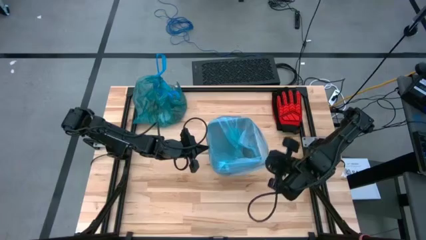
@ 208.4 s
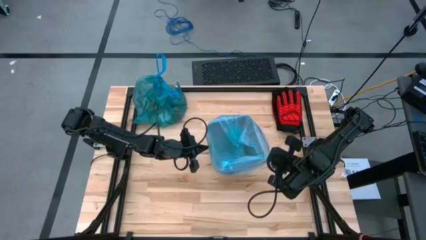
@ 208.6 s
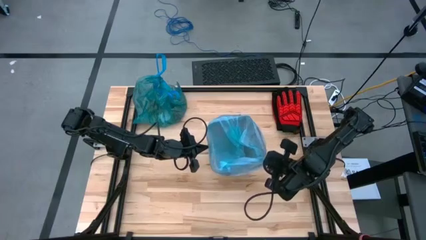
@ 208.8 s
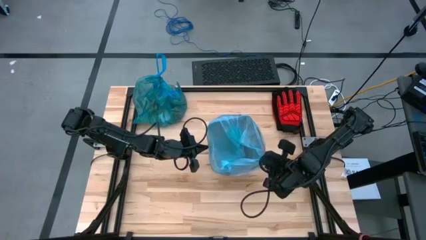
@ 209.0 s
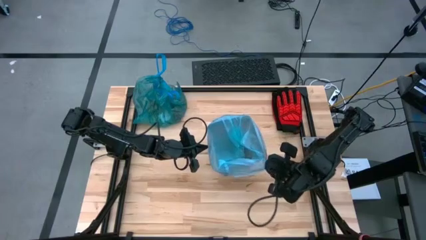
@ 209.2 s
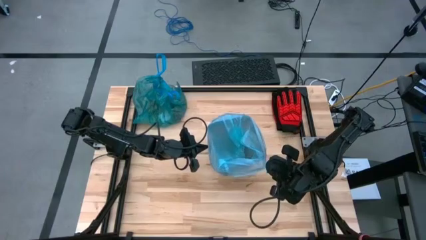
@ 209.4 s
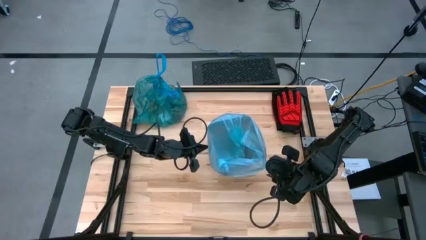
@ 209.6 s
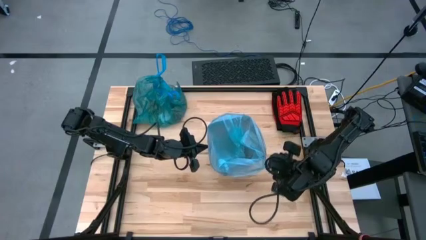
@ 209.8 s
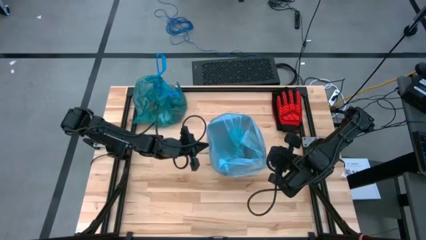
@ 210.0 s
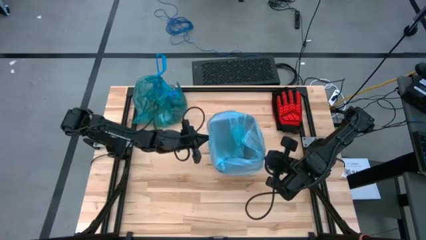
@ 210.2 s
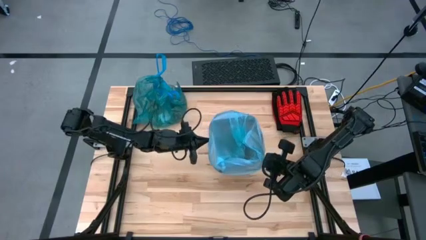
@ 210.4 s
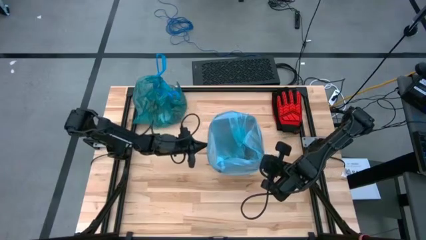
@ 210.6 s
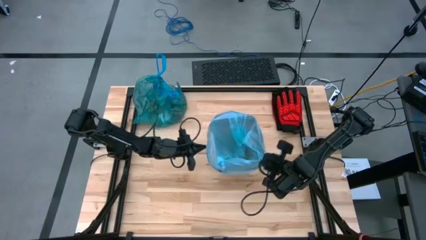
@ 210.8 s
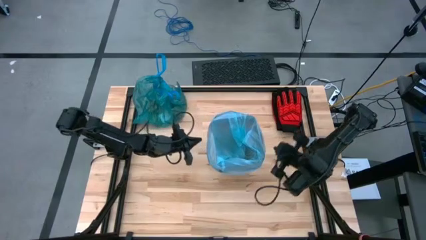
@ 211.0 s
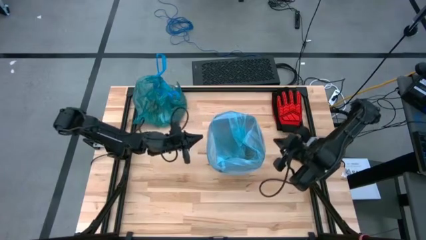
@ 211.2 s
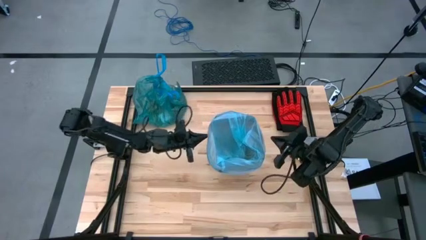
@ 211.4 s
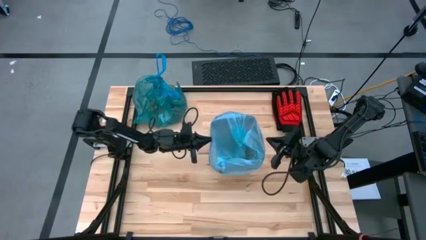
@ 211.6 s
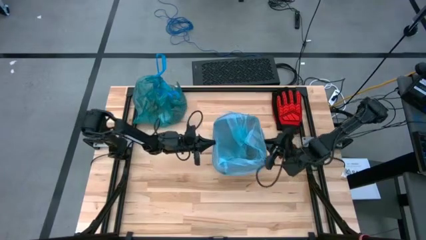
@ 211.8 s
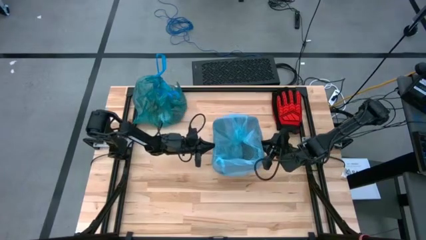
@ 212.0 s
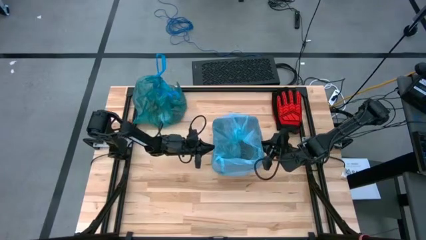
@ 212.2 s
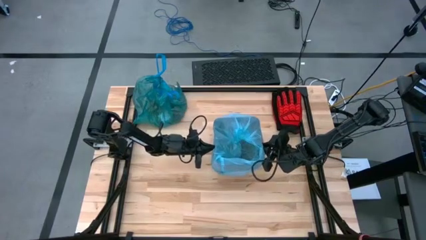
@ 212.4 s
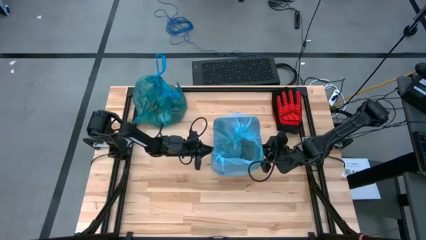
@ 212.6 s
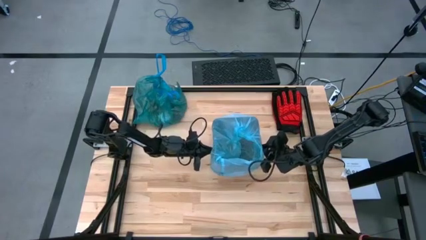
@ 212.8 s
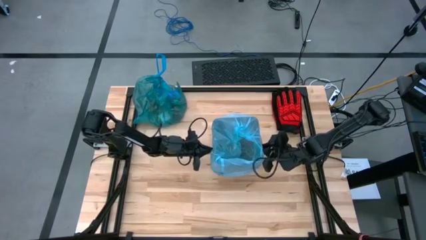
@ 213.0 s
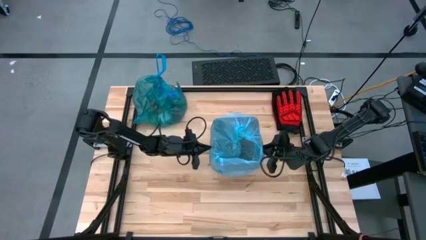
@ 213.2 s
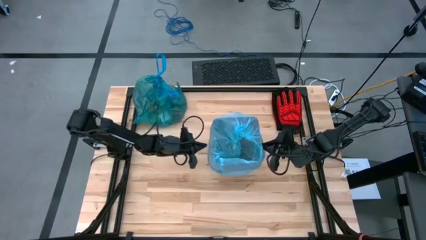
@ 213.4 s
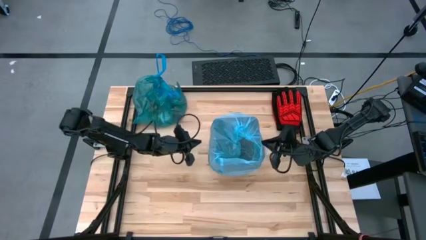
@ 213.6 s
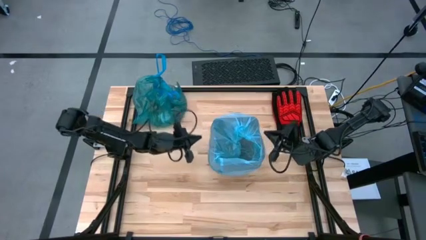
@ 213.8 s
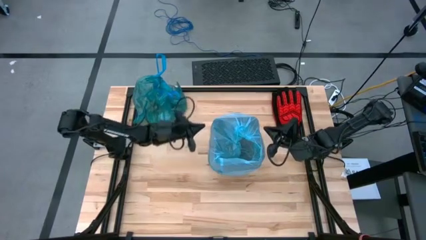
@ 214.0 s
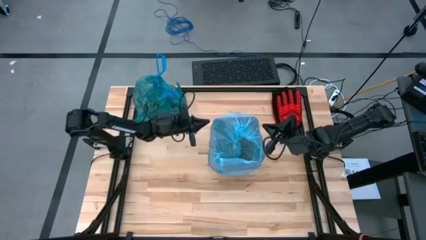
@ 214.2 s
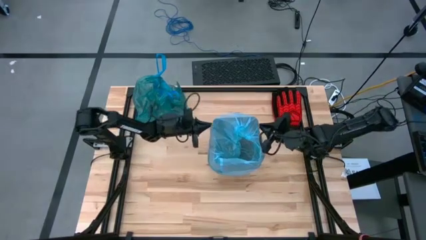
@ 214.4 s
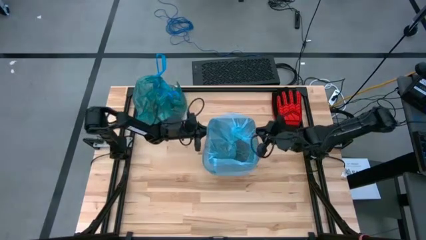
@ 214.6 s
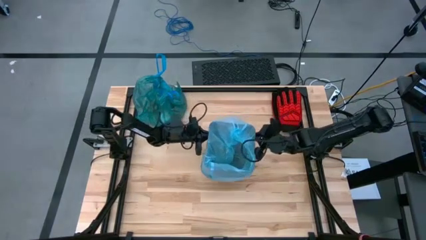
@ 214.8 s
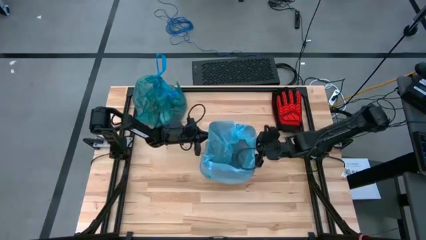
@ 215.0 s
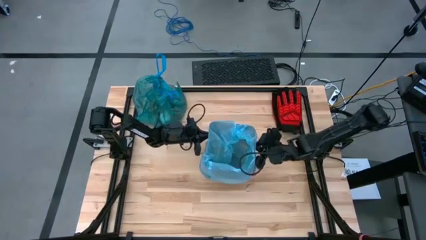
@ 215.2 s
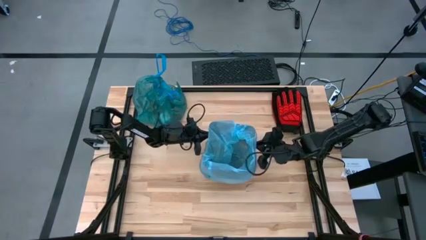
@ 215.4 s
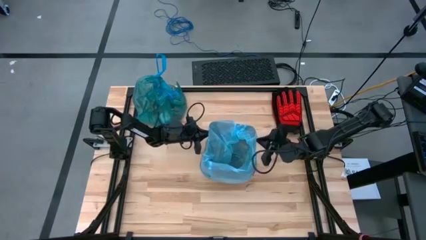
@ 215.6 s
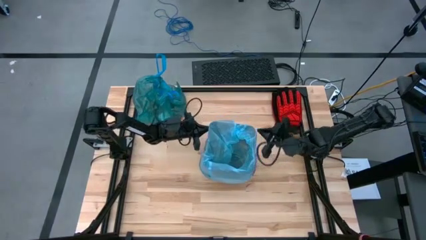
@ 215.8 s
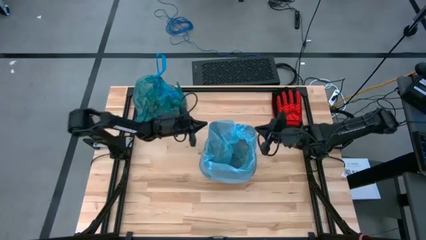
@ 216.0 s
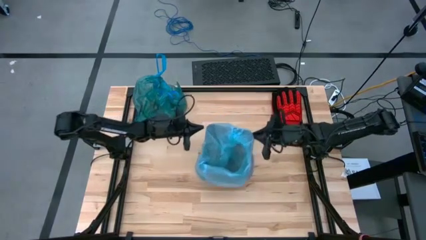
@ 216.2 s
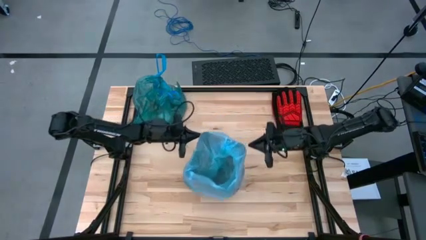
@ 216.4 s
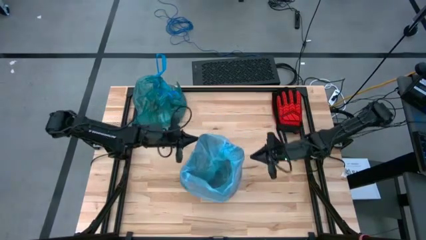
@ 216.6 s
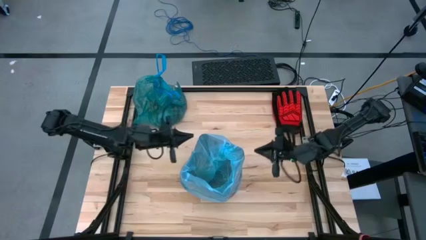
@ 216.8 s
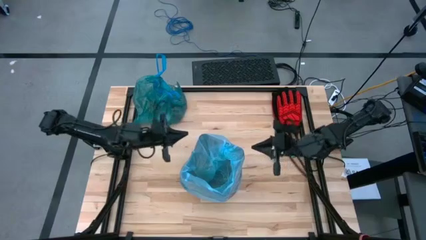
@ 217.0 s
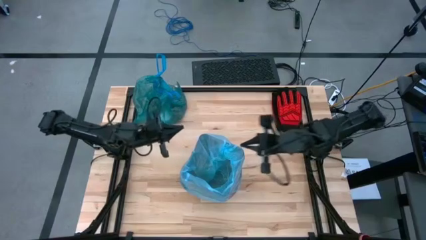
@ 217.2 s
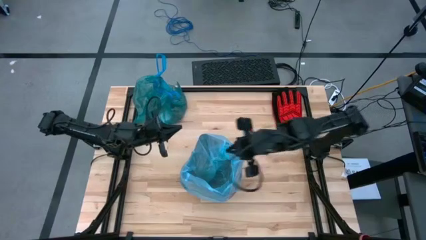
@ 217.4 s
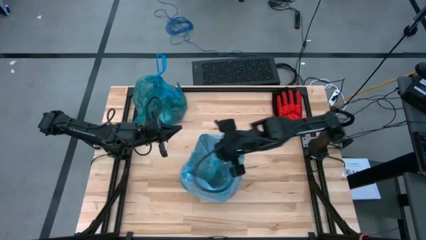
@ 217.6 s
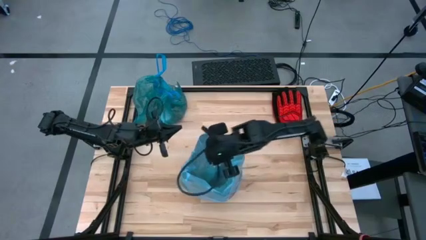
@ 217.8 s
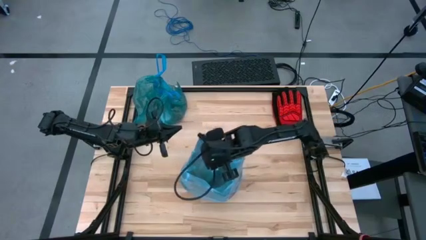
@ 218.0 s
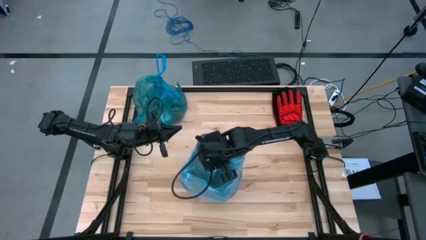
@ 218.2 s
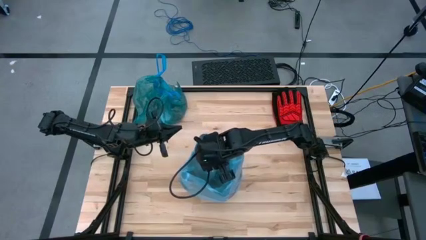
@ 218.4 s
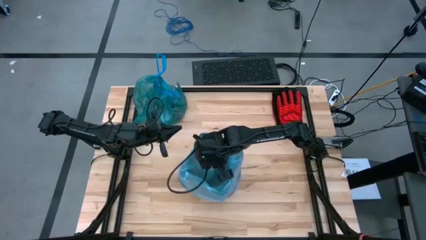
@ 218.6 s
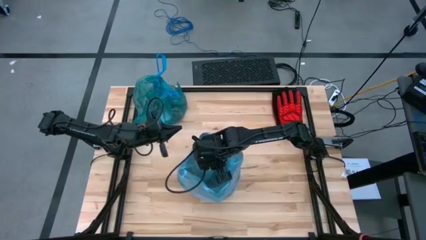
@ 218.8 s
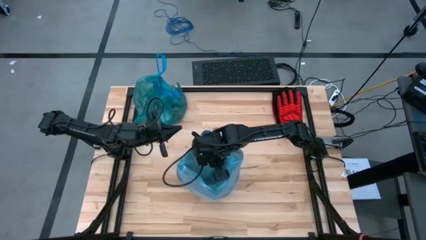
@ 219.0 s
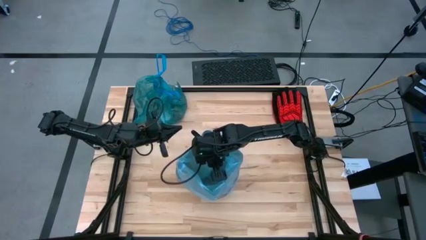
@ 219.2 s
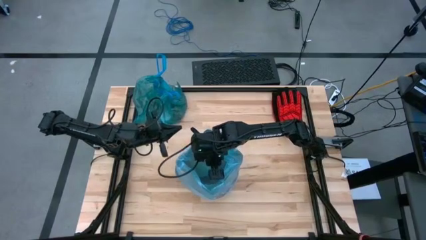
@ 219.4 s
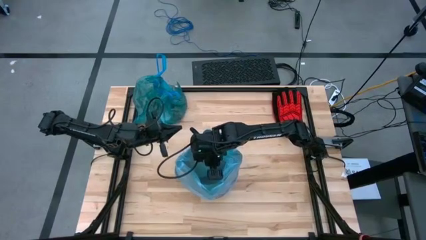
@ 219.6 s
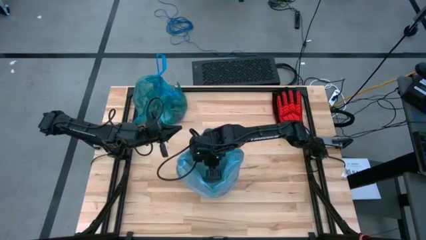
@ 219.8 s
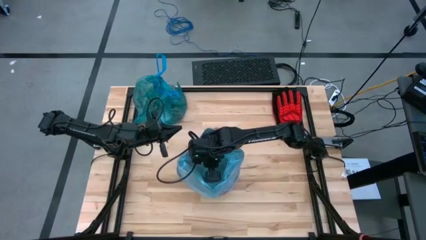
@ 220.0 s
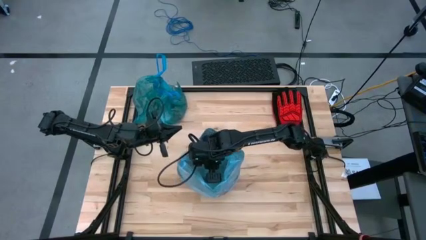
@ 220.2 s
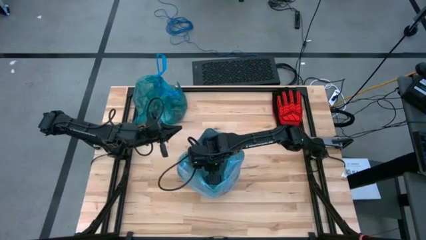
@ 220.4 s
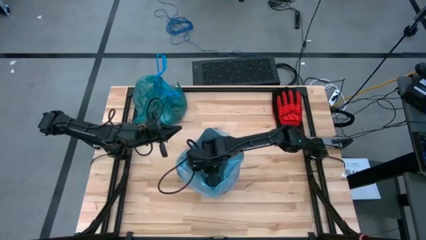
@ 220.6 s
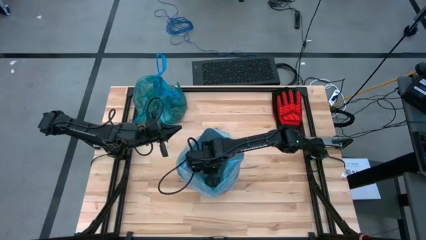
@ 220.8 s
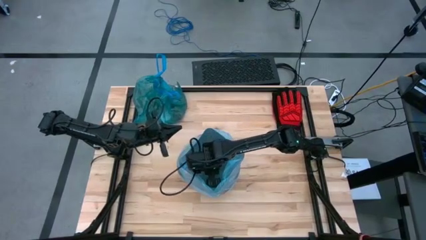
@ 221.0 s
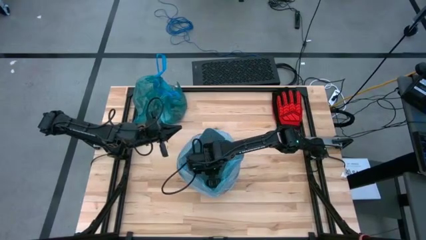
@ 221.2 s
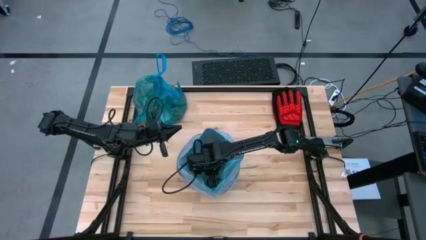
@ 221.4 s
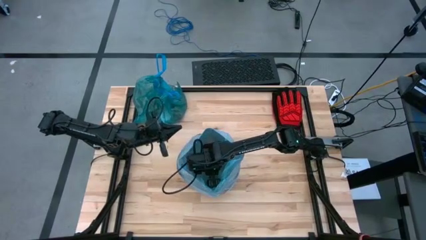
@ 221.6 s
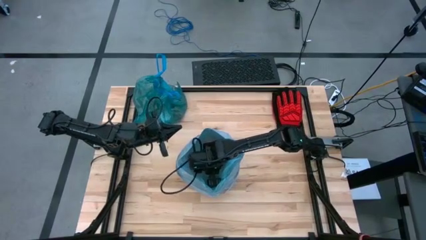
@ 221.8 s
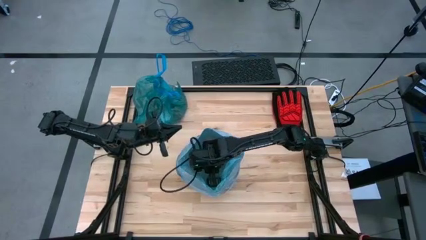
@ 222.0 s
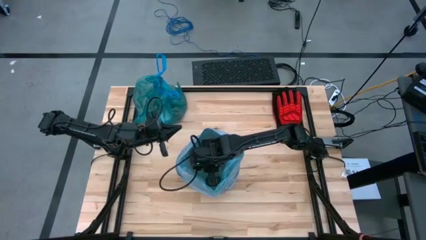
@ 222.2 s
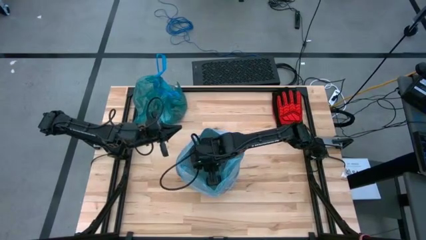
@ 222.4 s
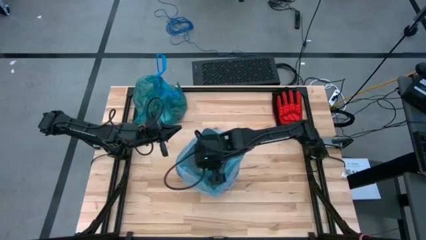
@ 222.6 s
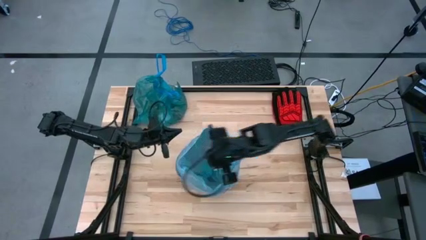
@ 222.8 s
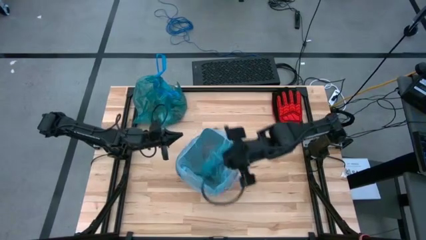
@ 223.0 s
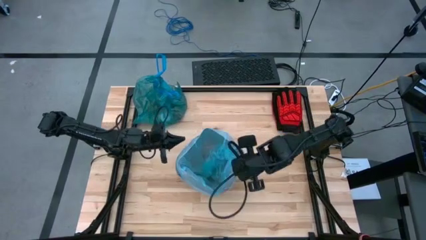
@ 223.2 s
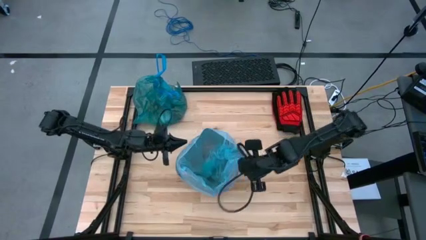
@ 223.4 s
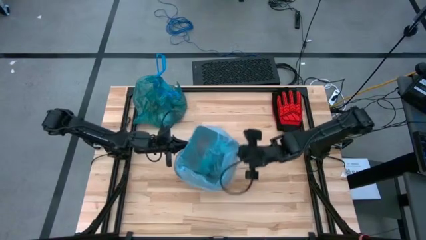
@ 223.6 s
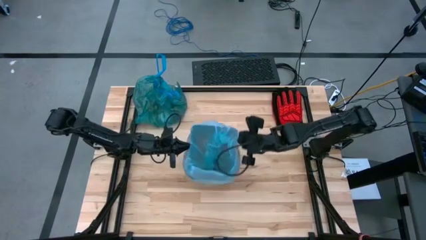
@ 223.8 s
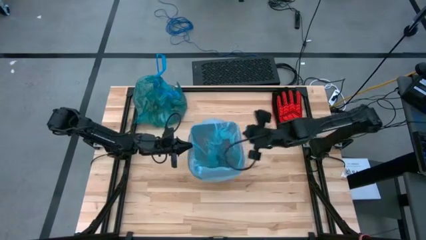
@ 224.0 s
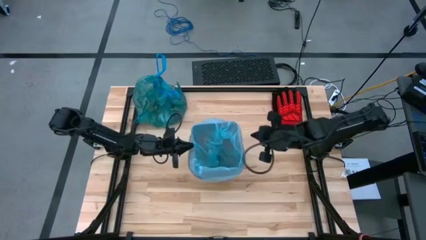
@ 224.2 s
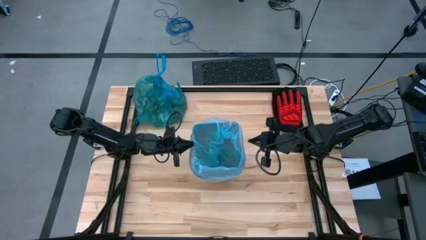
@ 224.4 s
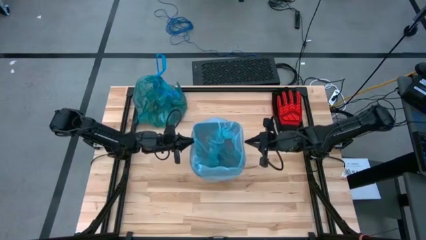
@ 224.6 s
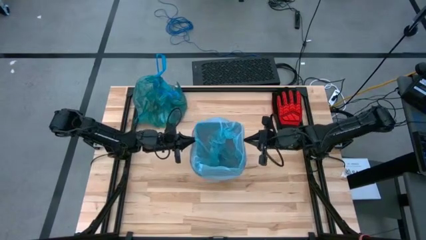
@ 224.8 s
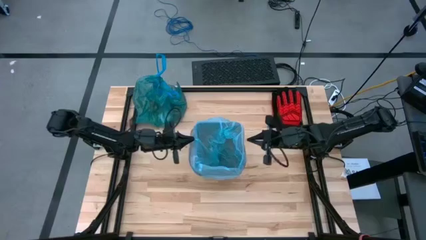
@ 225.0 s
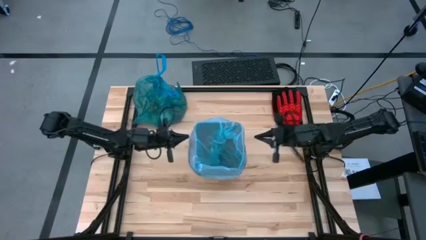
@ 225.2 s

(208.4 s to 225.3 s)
Task: place trash/remove bag and relplace
Insert the blue trash bag into the trash bin
